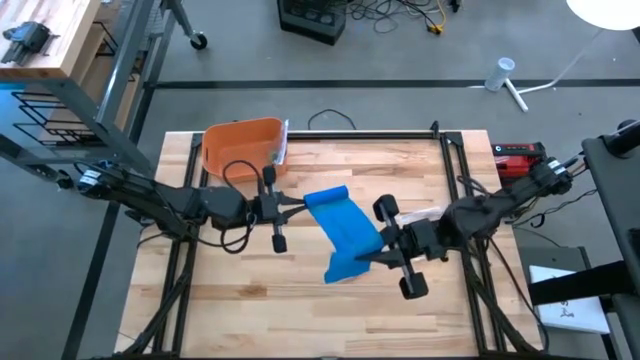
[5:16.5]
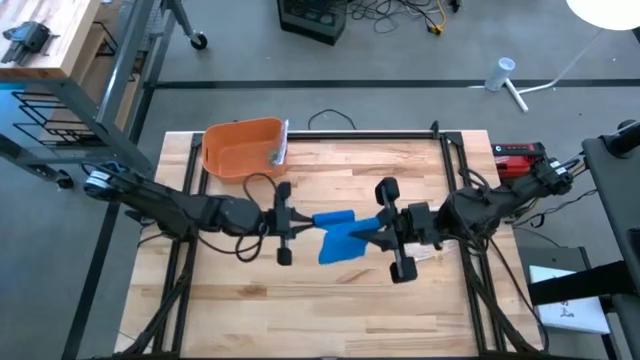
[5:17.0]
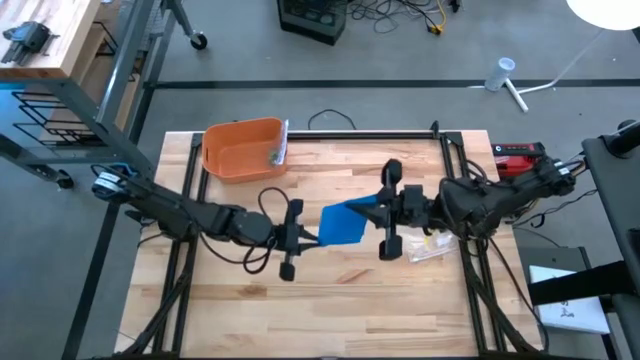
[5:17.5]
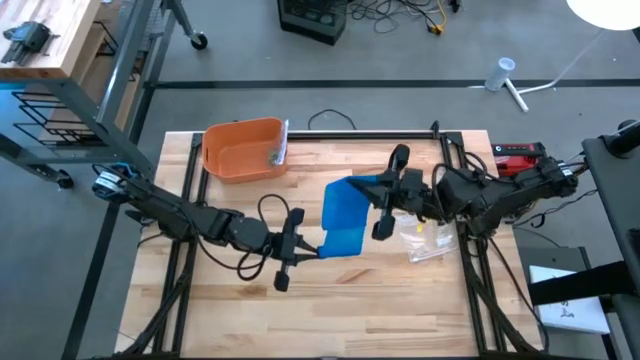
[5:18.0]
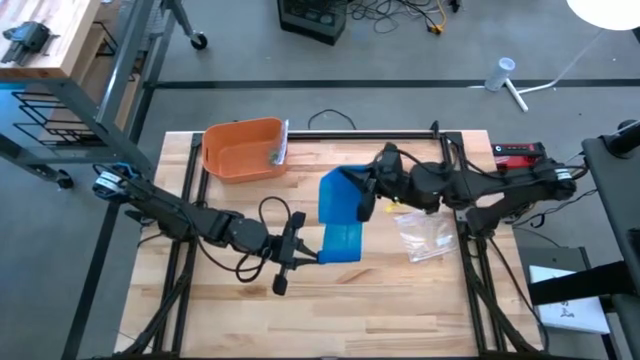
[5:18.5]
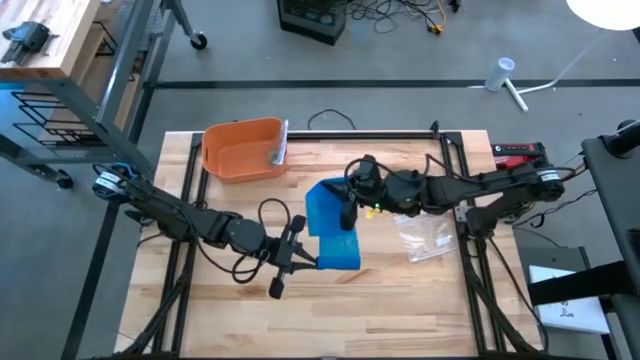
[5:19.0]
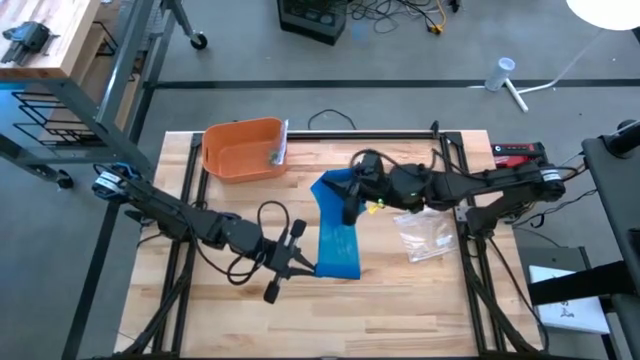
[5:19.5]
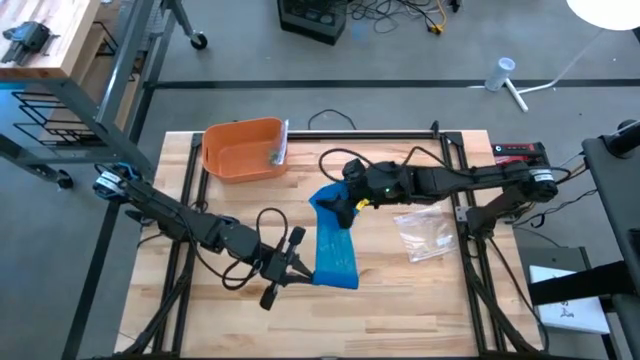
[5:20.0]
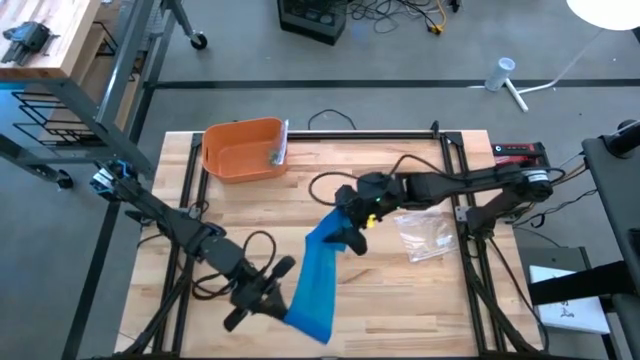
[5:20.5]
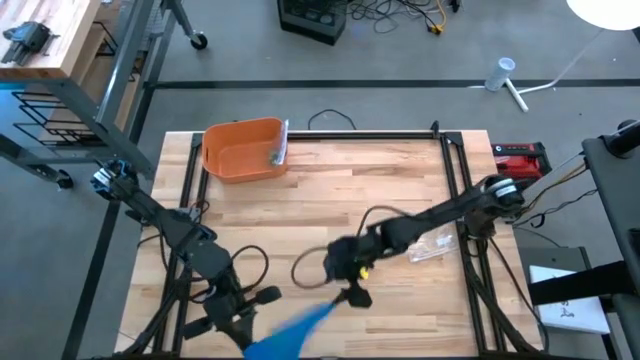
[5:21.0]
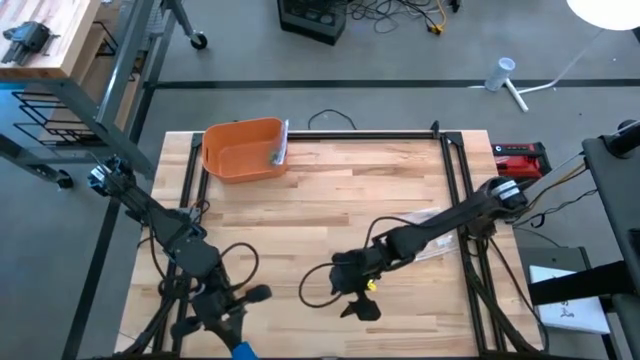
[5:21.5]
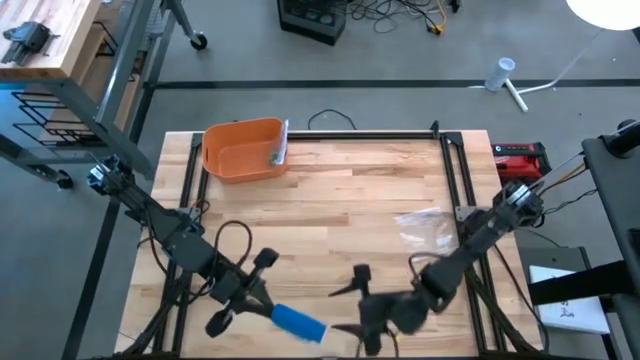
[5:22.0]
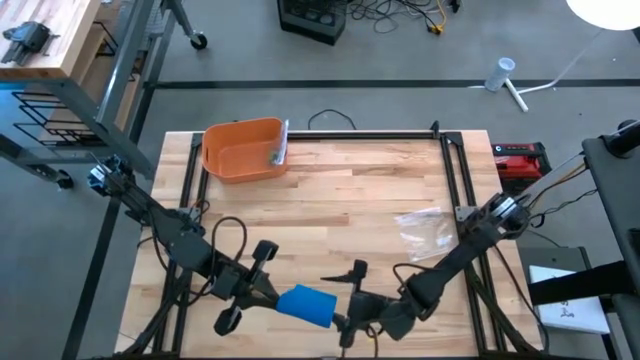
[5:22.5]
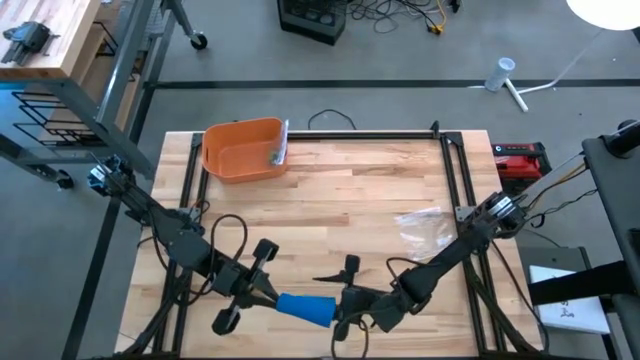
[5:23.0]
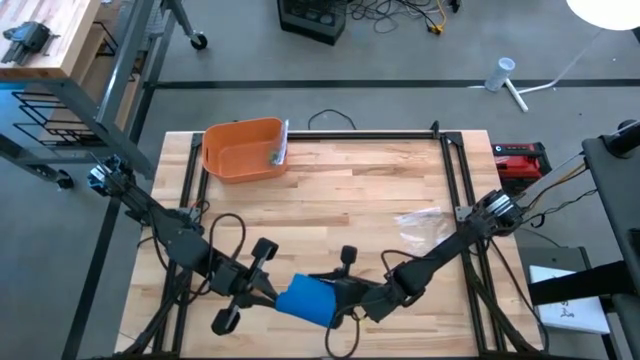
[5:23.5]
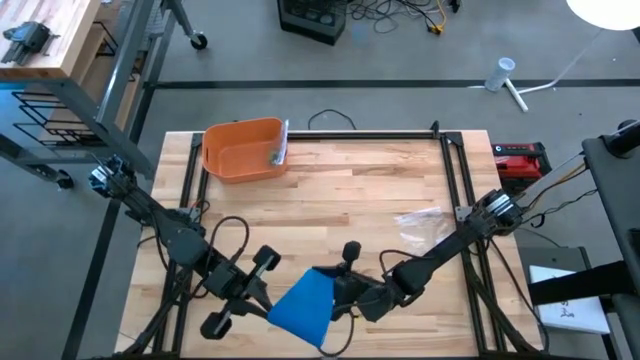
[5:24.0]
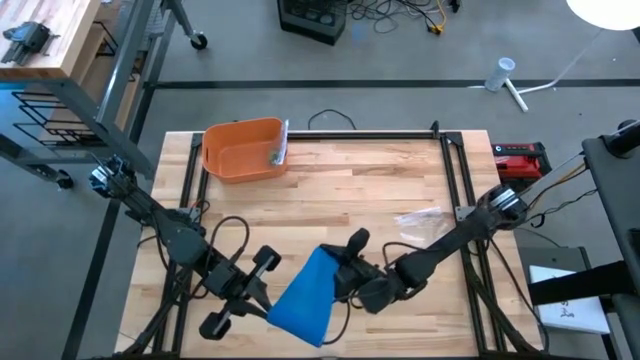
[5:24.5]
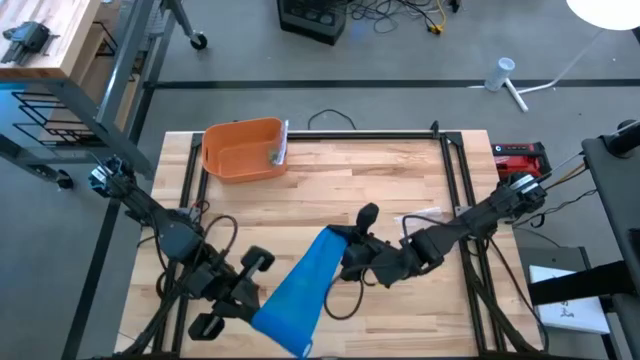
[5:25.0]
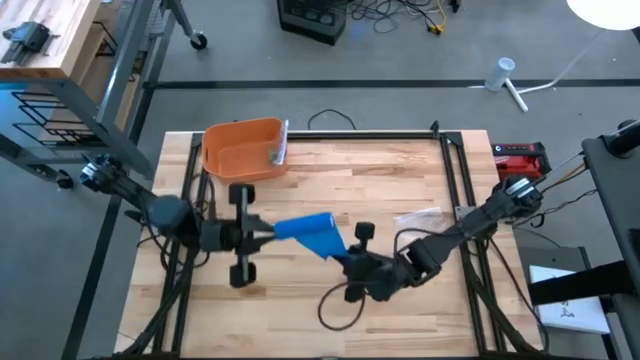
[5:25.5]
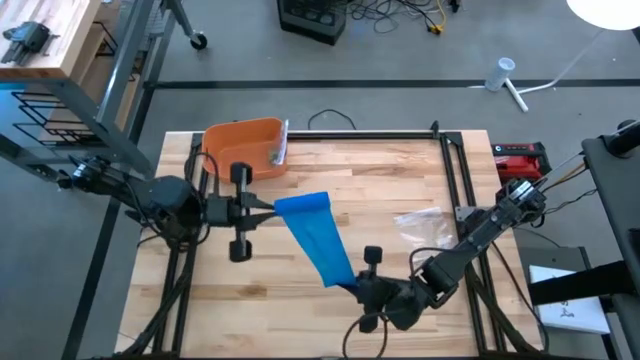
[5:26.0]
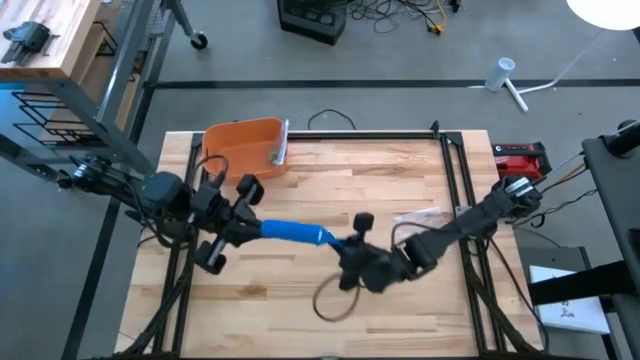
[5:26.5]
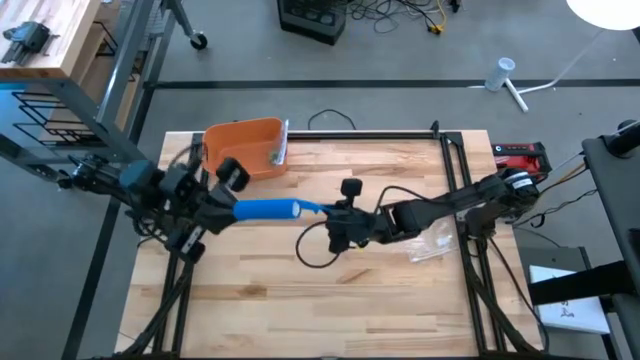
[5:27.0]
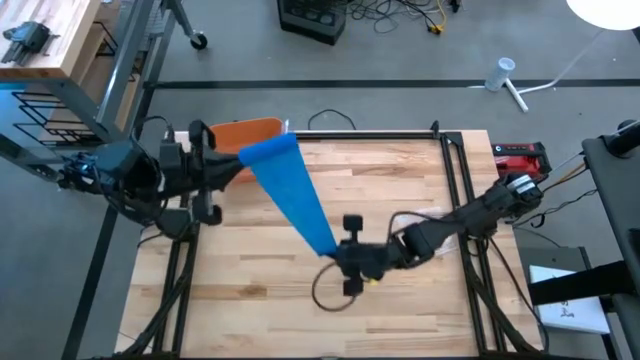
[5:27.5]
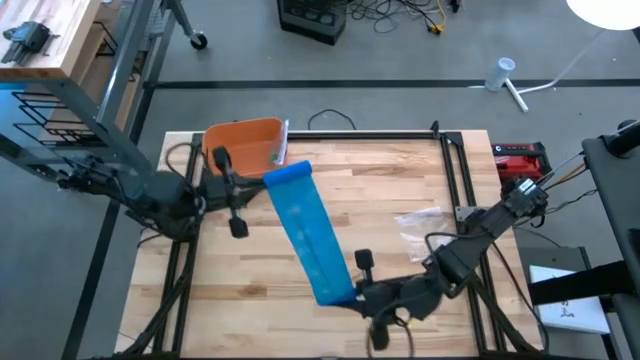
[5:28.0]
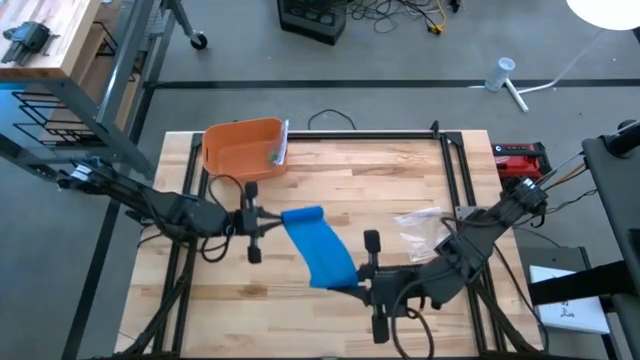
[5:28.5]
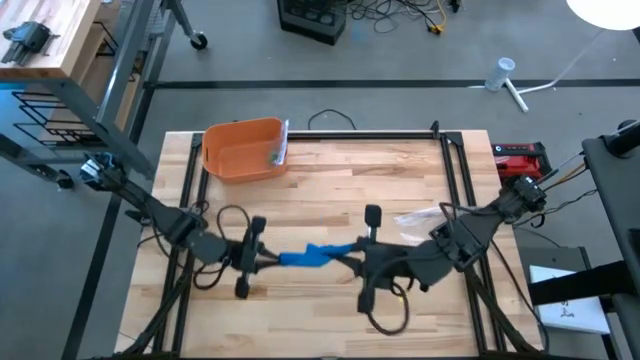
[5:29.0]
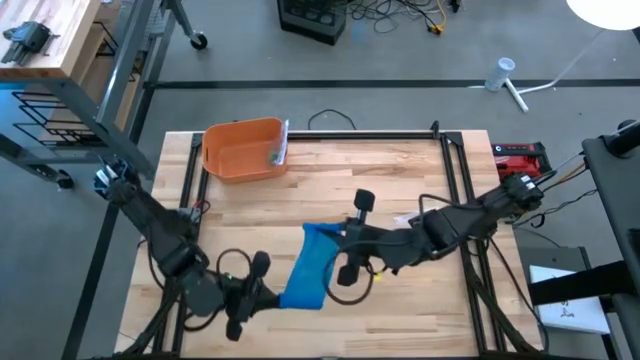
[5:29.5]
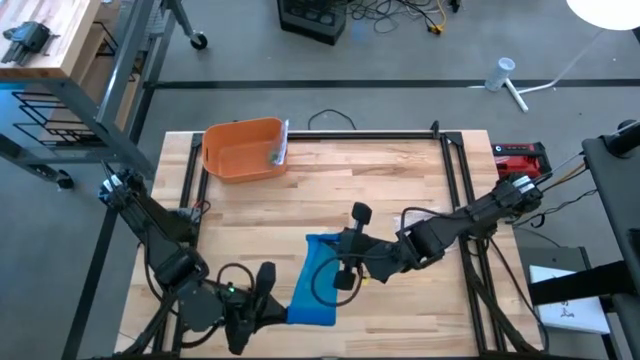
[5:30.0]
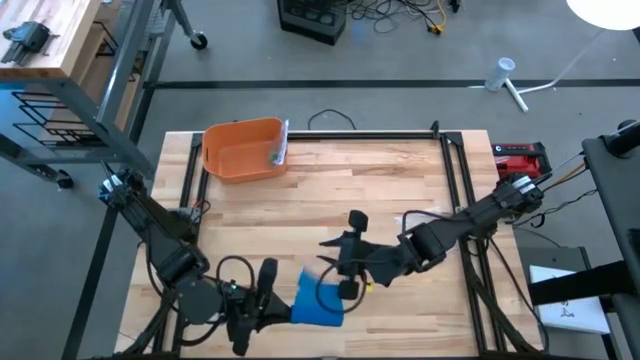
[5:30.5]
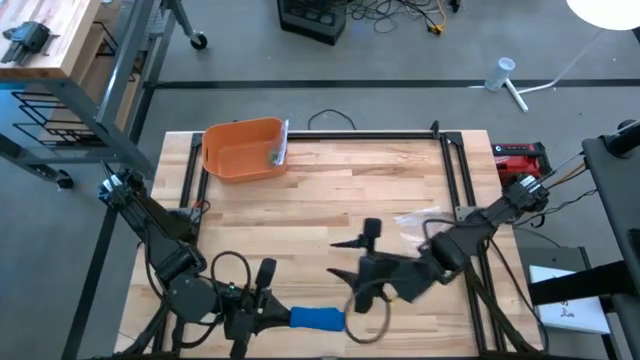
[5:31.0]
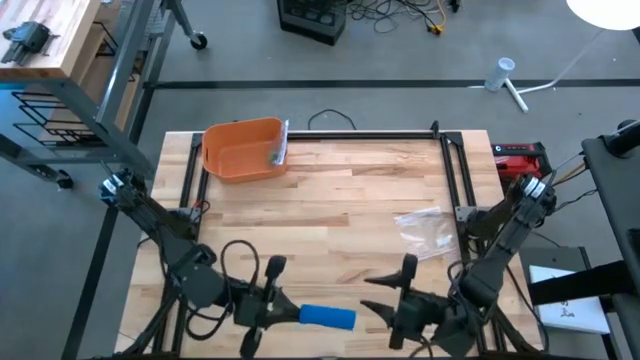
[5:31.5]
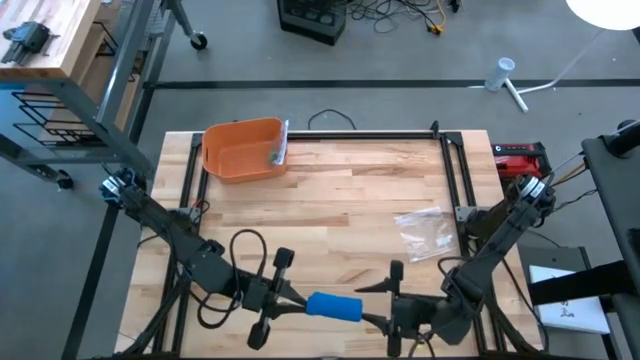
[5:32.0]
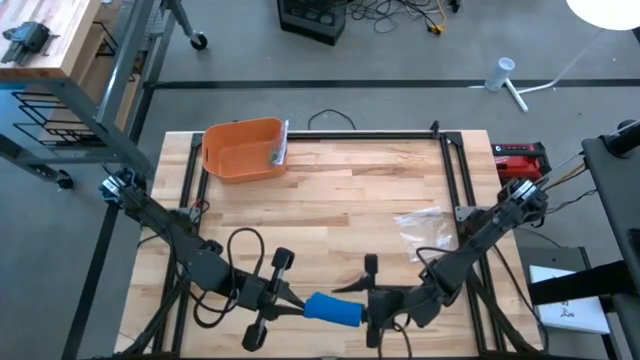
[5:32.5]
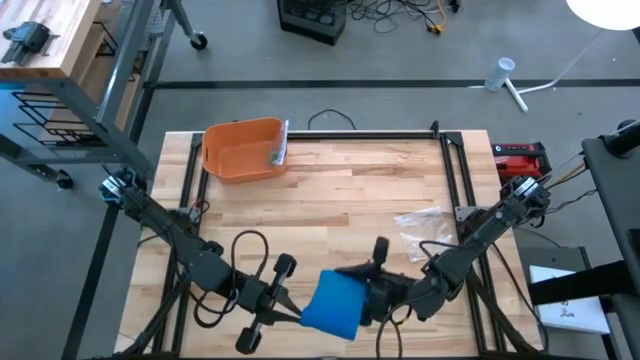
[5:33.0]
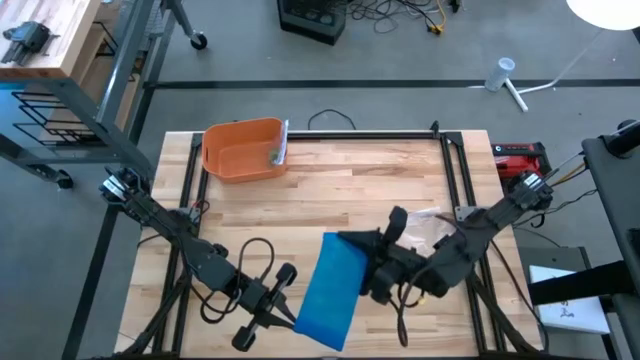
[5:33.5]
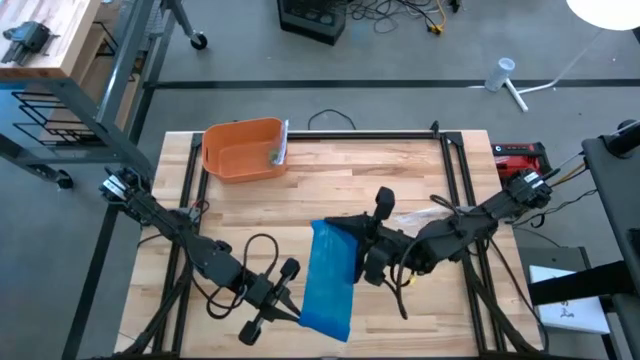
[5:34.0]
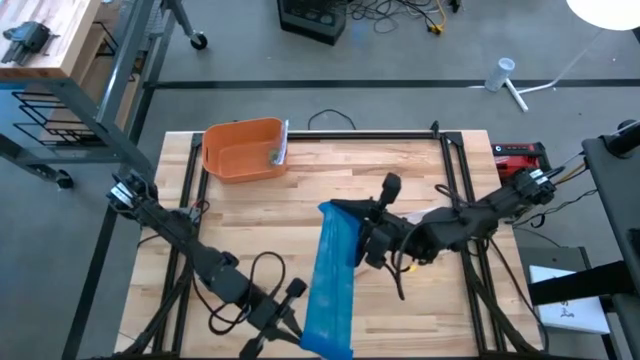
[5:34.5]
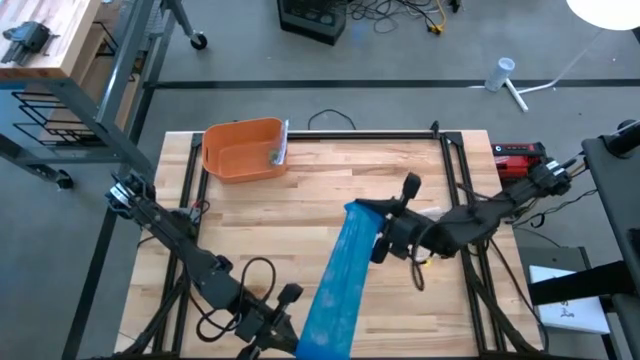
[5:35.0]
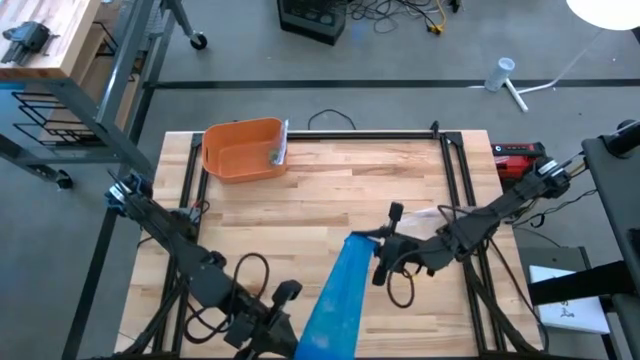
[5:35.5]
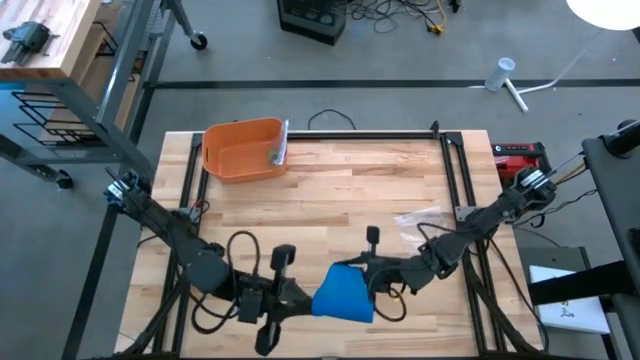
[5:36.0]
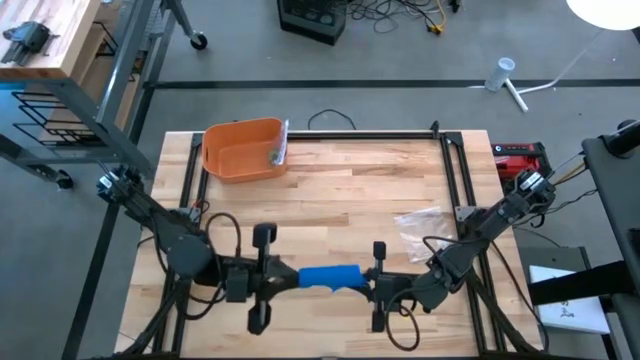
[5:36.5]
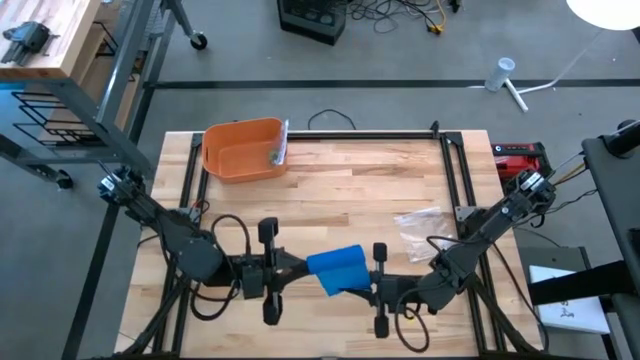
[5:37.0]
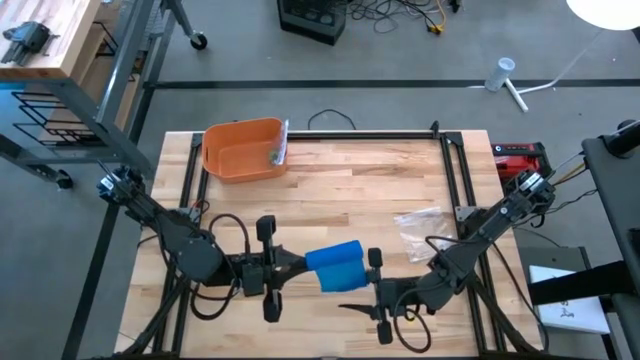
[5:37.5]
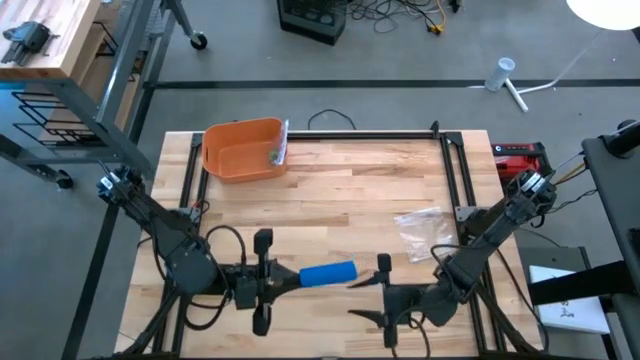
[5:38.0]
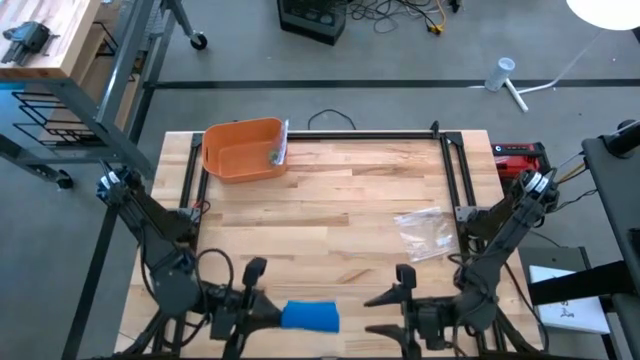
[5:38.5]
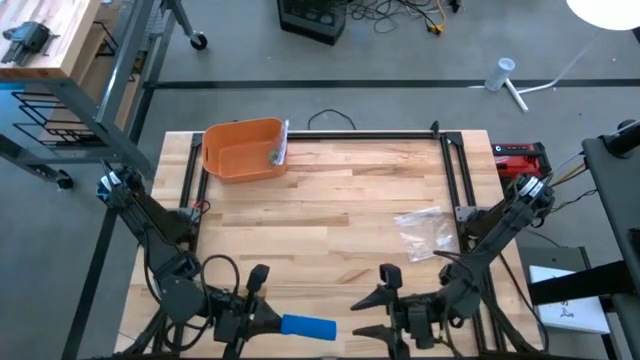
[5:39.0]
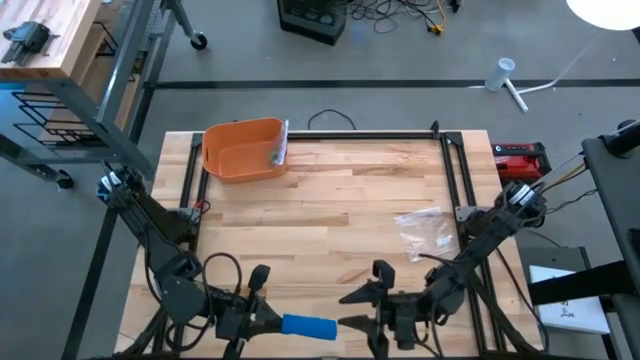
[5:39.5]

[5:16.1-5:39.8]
Task: Roll bandage
Roll the blue bandage
